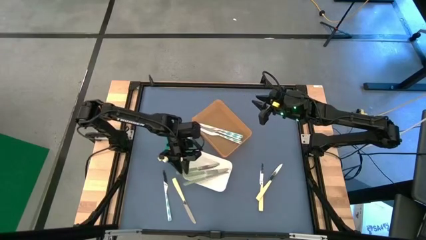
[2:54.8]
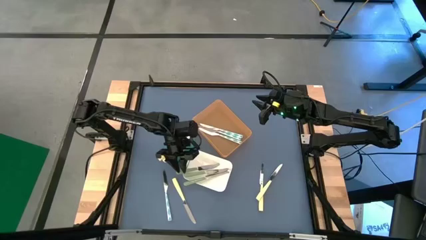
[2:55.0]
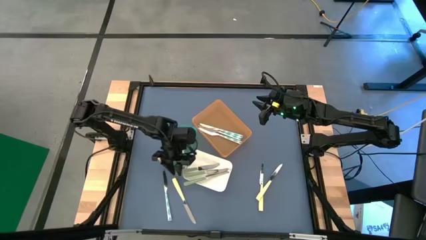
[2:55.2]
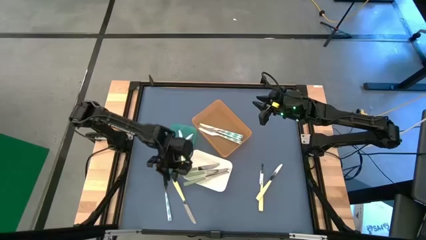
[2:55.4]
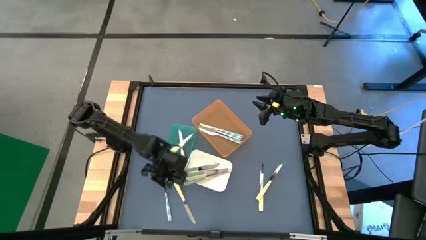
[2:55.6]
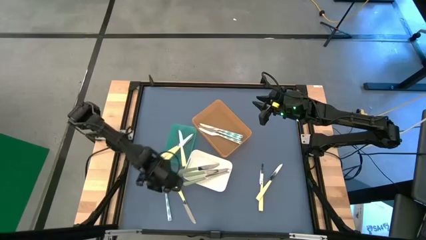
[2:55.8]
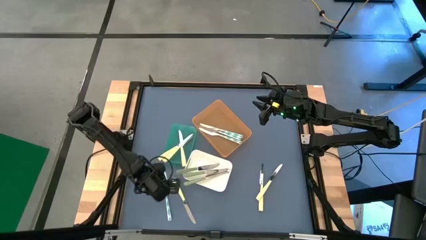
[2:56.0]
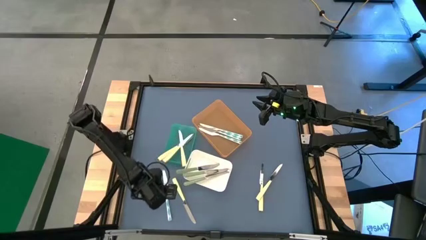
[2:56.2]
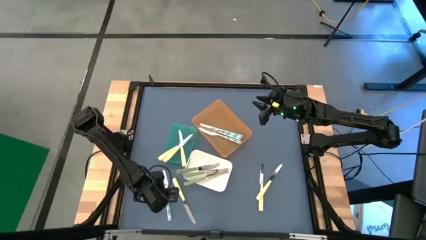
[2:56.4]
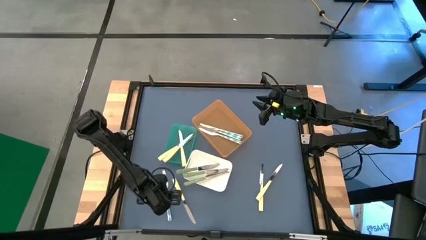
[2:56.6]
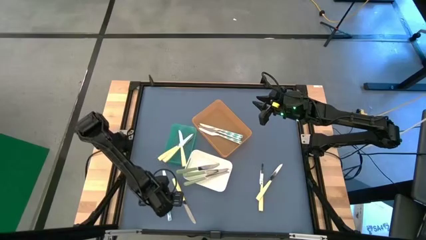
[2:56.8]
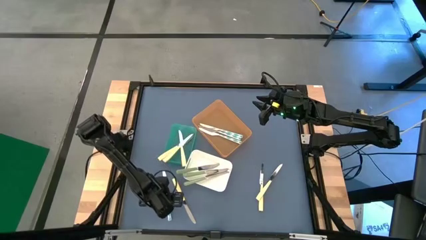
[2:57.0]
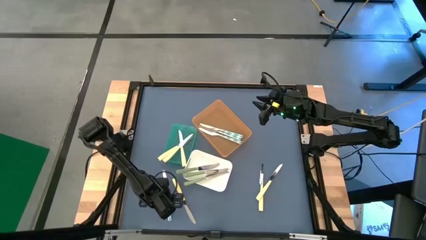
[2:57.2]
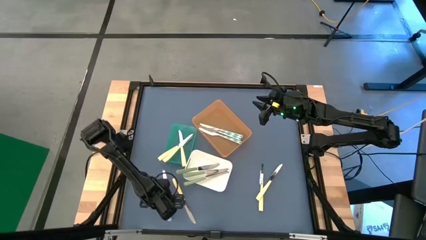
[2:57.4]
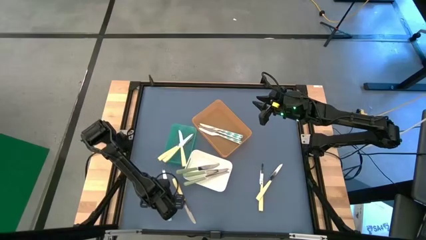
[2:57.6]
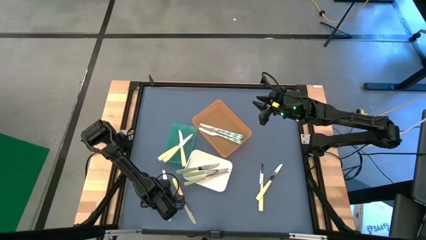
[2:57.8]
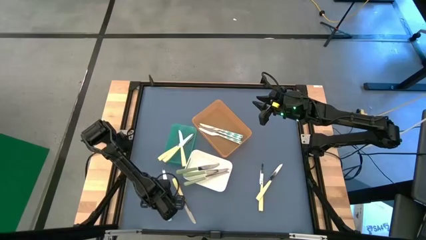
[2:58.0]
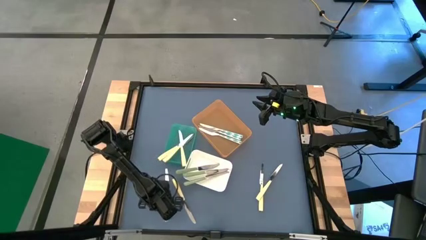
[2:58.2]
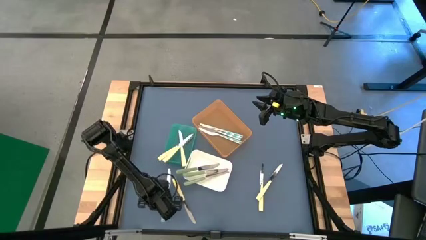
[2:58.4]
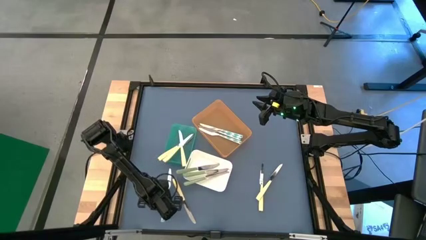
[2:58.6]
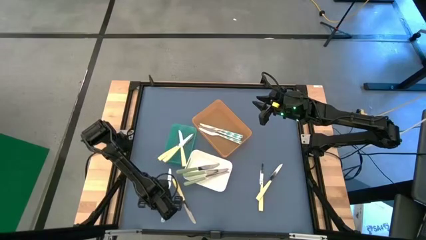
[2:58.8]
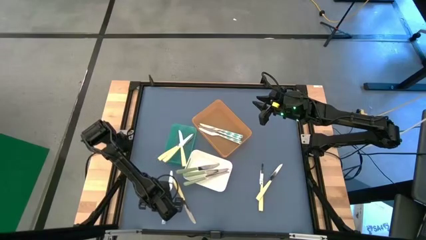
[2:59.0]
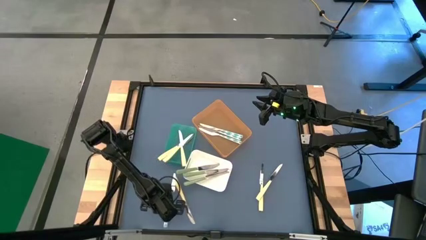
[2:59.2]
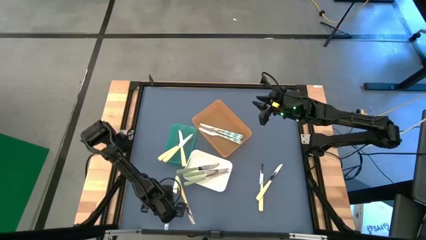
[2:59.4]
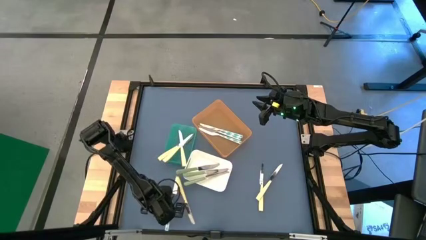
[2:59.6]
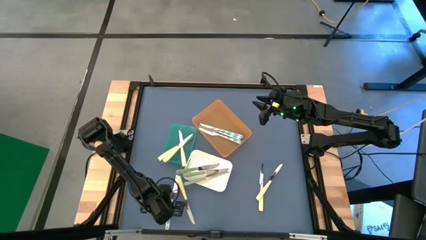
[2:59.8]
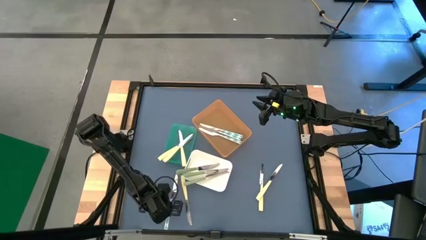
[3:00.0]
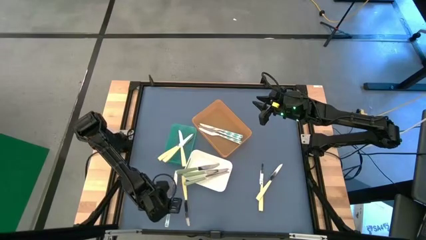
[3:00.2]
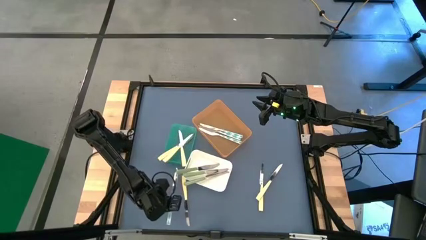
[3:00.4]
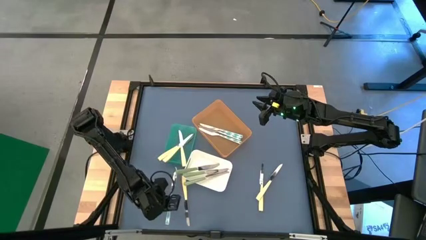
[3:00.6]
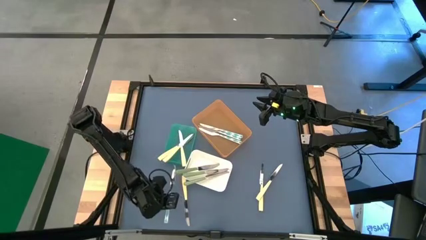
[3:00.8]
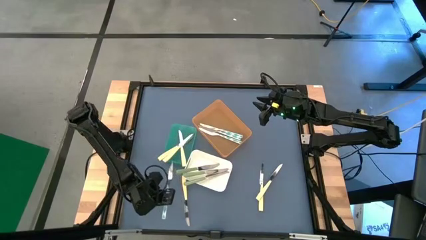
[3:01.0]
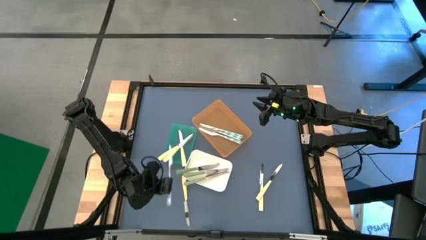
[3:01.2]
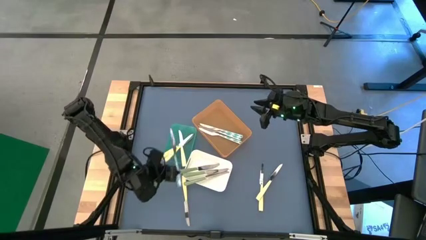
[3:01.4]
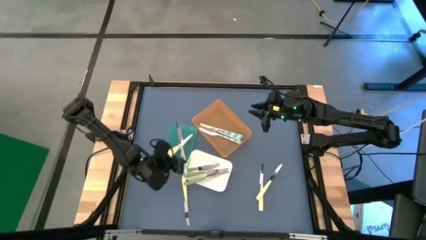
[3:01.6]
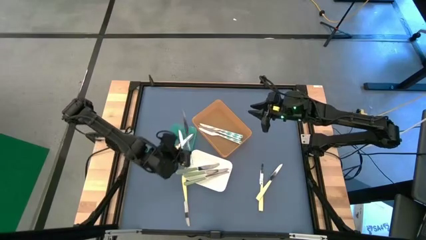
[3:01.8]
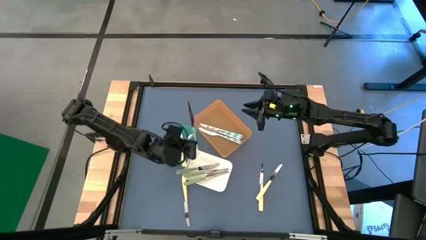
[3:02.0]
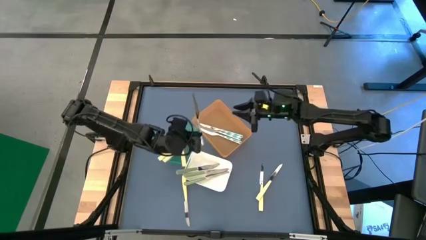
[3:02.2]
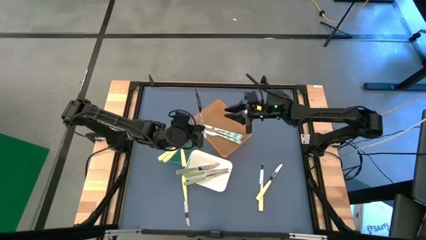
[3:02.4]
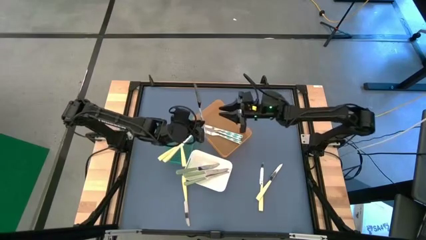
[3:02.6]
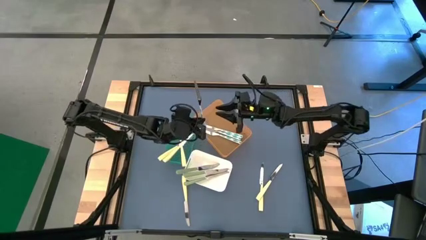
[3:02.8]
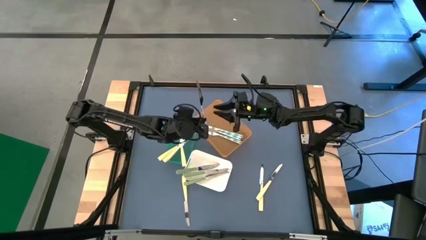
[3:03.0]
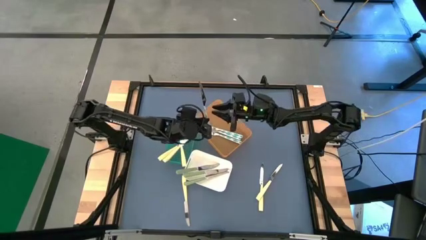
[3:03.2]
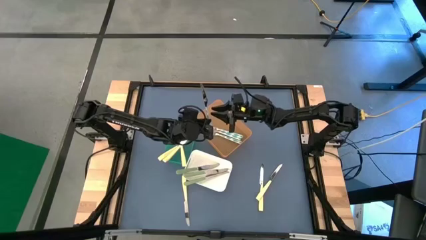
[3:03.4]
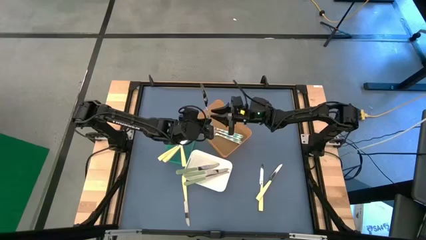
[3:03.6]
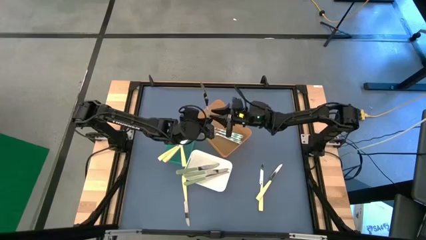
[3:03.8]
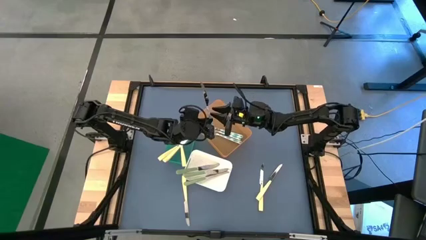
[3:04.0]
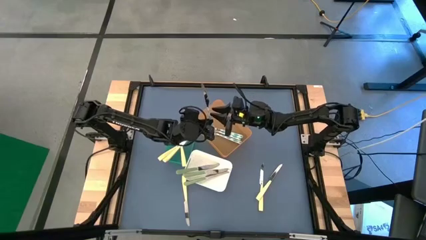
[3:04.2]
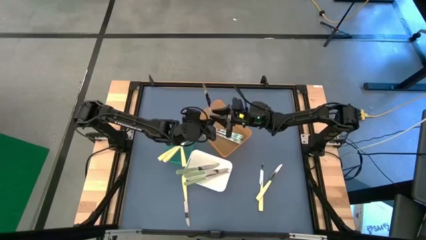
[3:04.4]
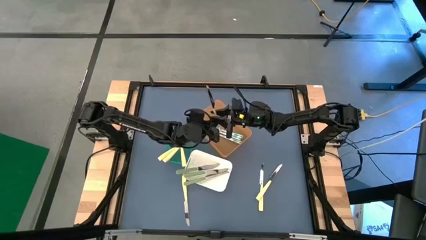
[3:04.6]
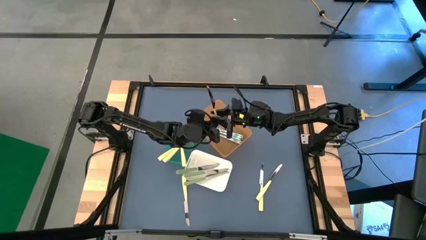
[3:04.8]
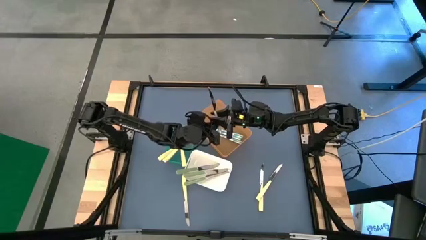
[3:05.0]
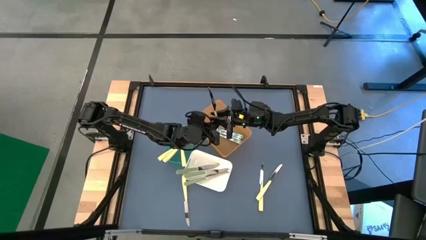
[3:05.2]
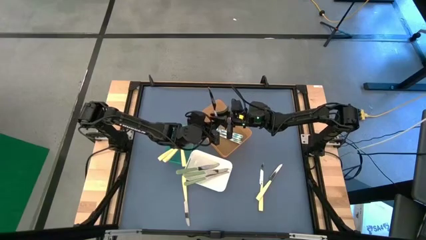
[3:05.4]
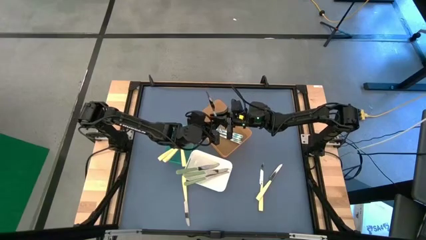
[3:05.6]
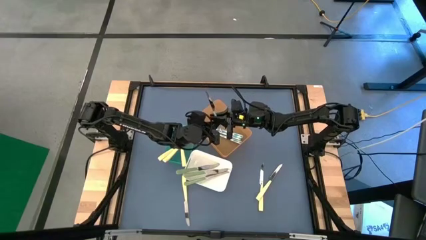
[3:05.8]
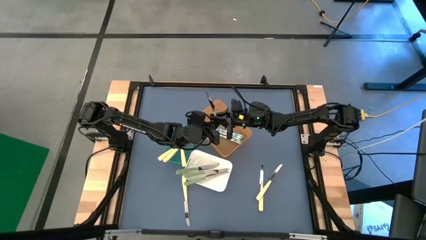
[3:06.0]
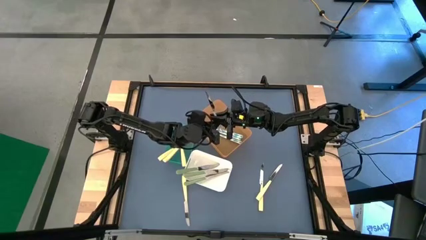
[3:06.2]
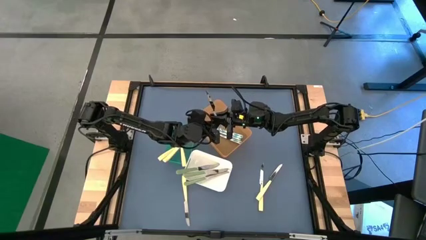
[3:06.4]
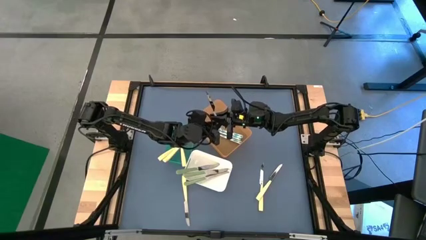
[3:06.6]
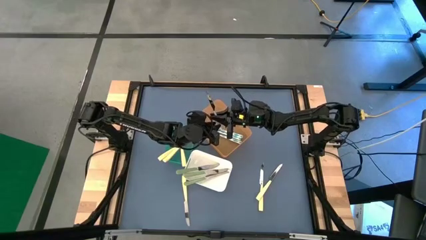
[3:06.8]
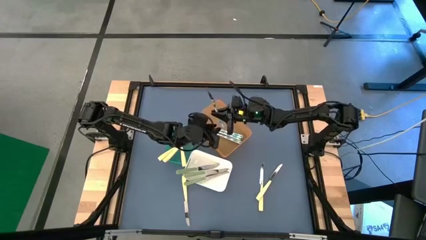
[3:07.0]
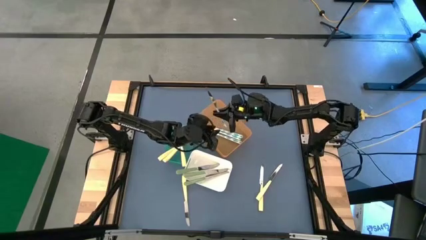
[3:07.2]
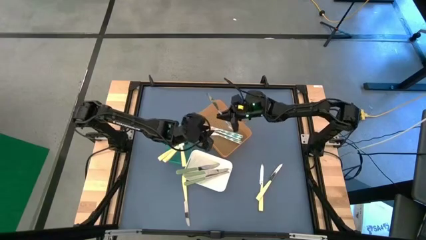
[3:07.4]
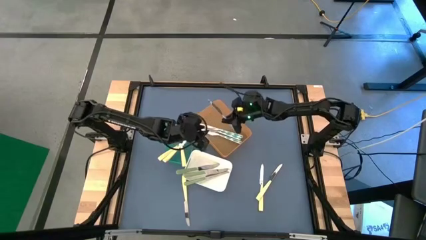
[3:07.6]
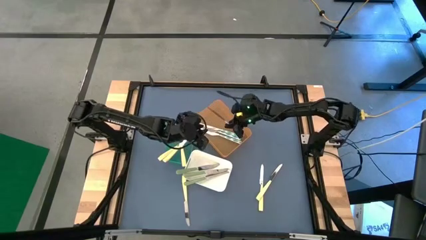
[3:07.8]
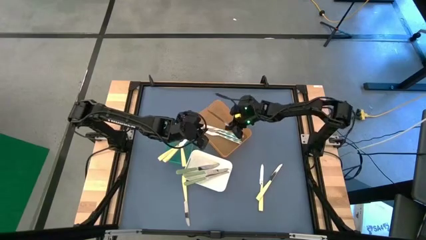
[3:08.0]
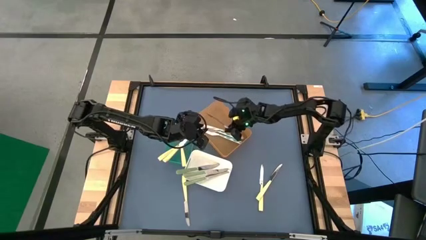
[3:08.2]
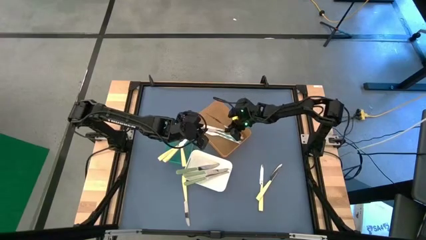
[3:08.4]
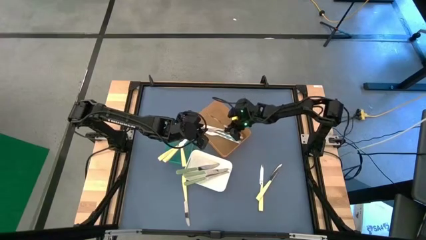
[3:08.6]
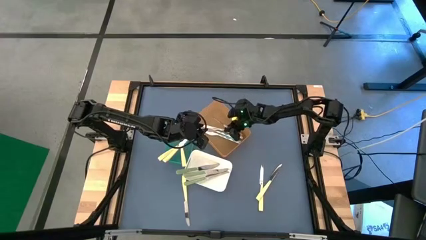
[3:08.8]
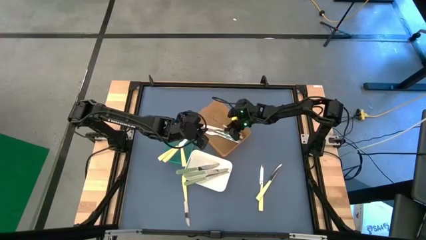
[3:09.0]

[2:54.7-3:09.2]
Task: Sort silverware by color (type)
Put the blue table knife into the orange bin

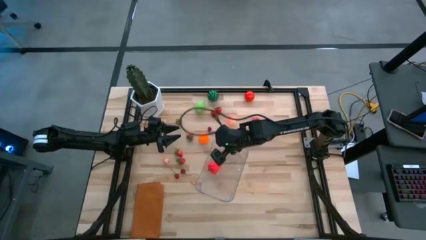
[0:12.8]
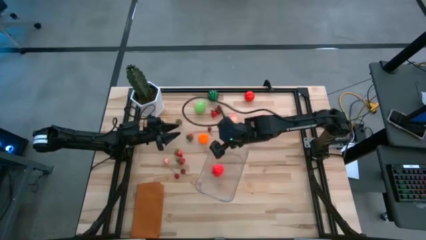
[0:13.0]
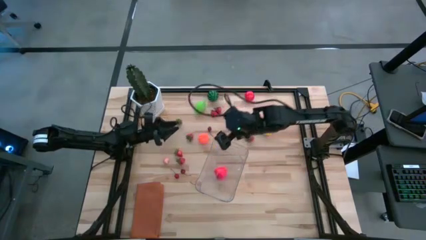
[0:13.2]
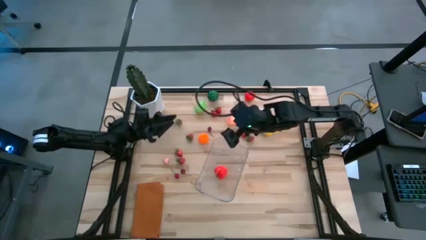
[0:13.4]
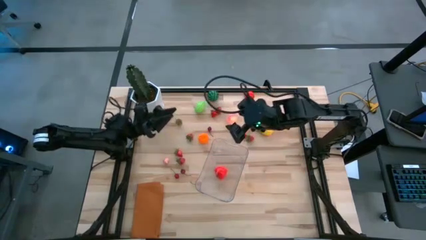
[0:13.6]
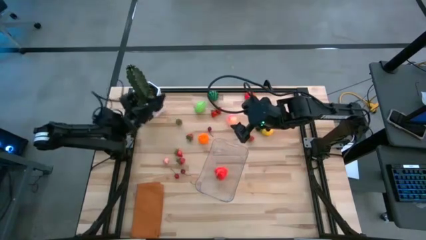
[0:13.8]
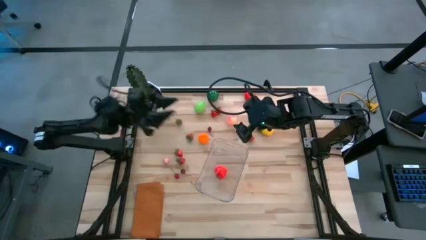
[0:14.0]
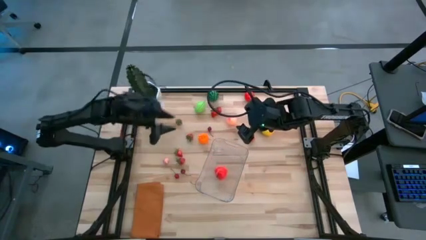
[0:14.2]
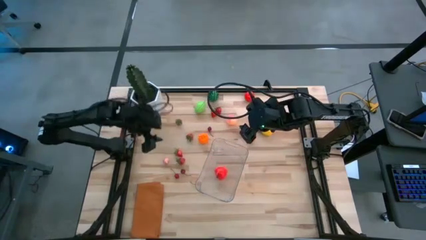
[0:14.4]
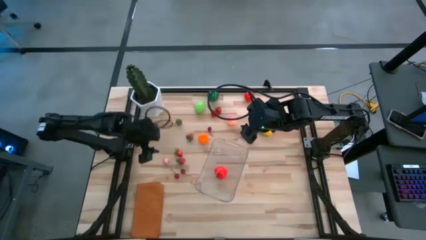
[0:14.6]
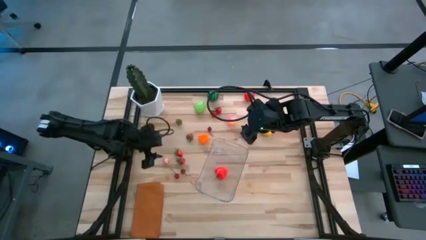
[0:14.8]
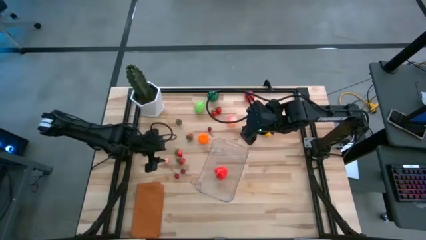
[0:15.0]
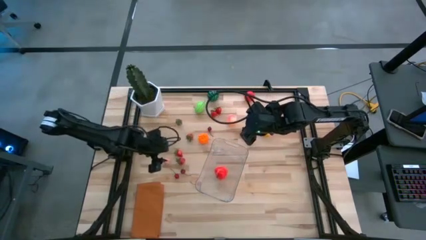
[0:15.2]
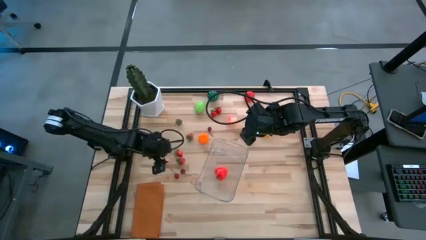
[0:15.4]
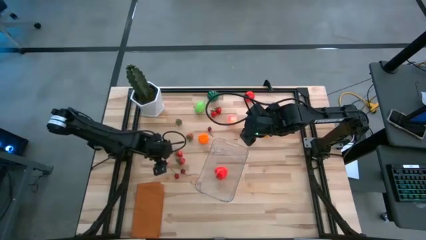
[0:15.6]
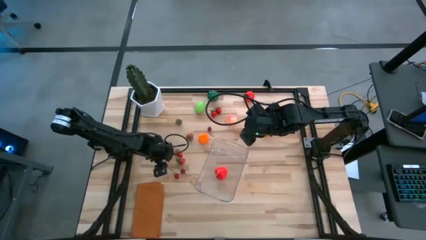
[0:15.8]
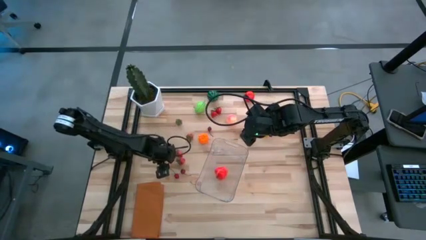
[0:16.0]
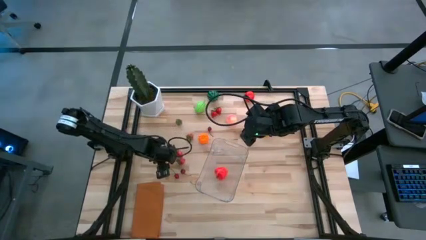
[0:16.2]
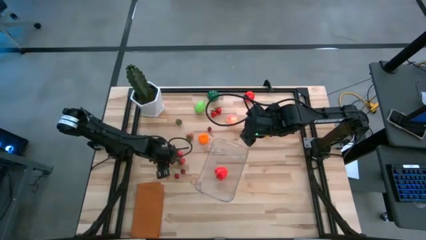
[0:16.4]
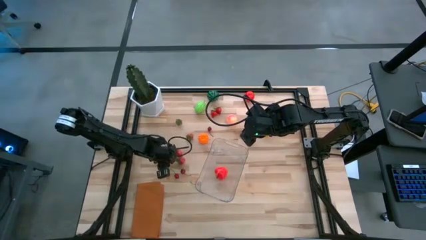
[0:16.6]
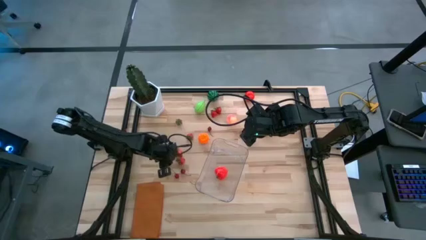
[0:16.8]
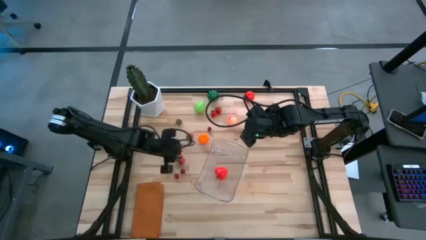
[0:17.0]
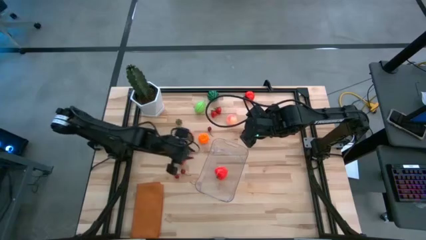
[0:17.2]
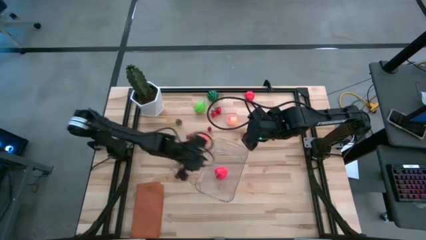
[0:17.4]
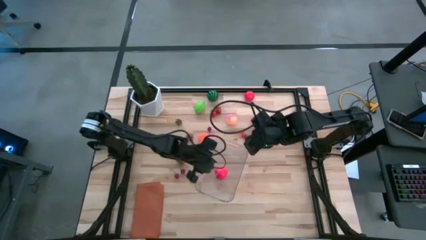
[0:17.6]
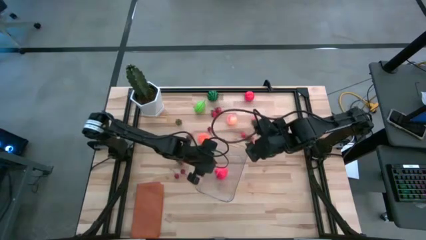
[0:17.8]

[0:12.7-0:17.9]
Task: Pick and placing Produce into tupperware
Put the pink peach into the transparent bin
